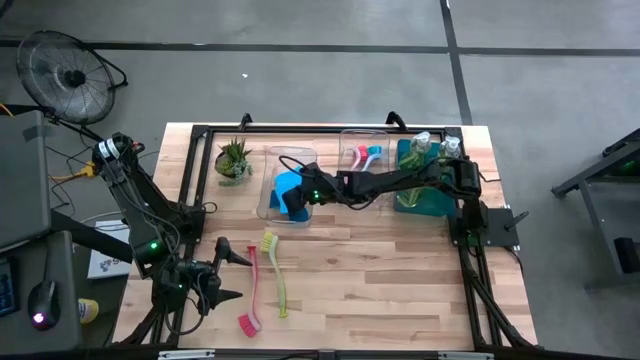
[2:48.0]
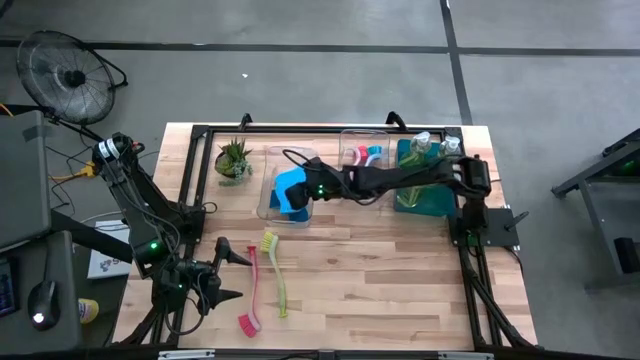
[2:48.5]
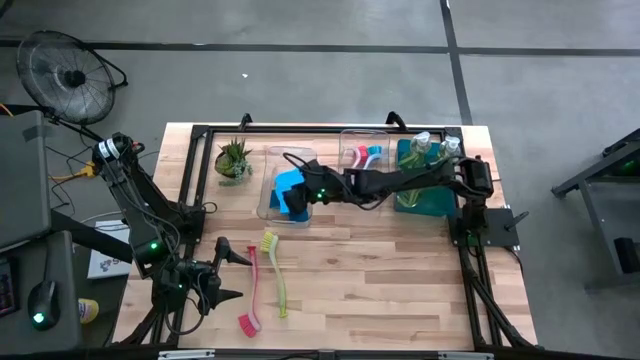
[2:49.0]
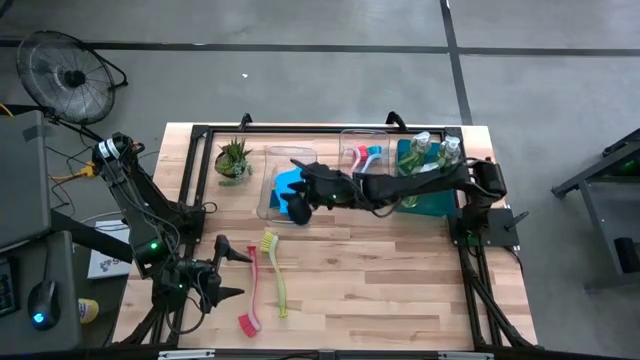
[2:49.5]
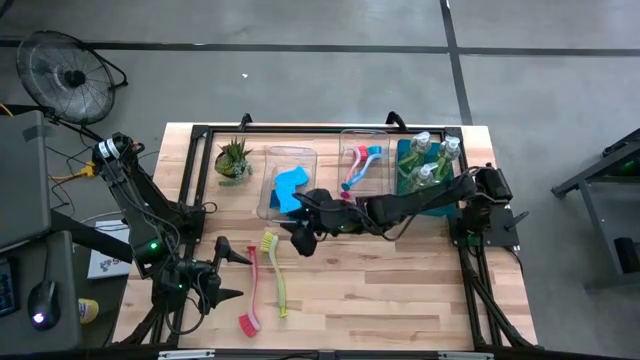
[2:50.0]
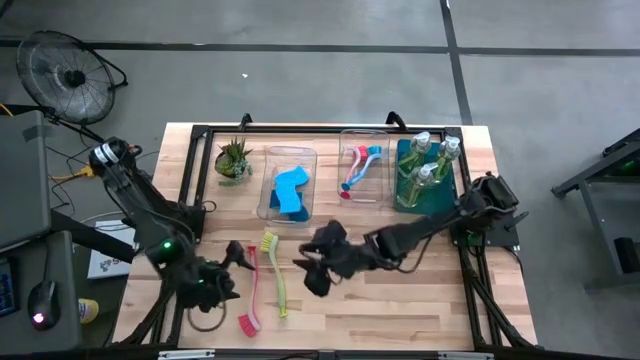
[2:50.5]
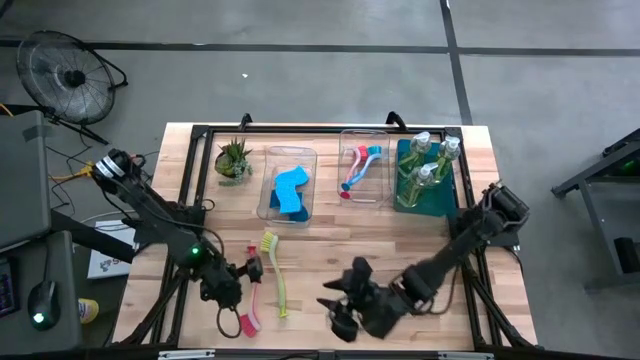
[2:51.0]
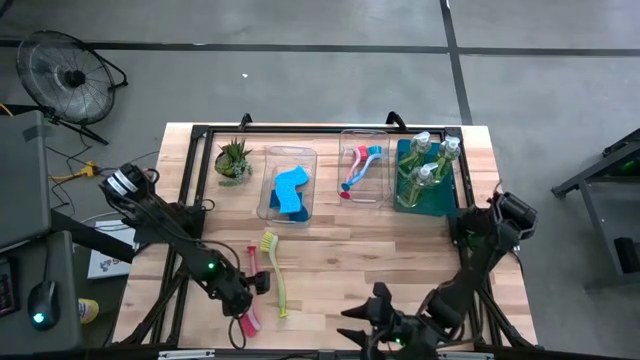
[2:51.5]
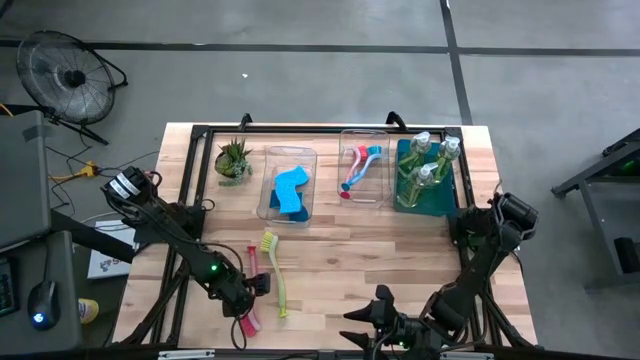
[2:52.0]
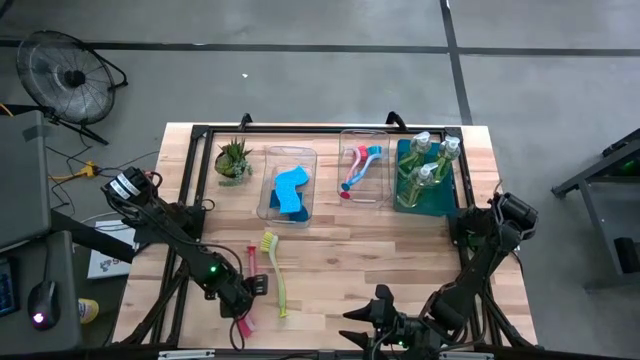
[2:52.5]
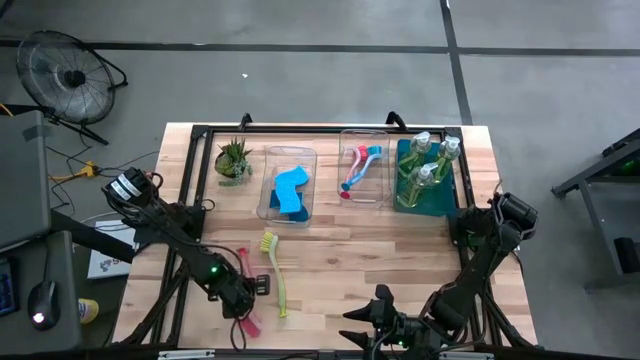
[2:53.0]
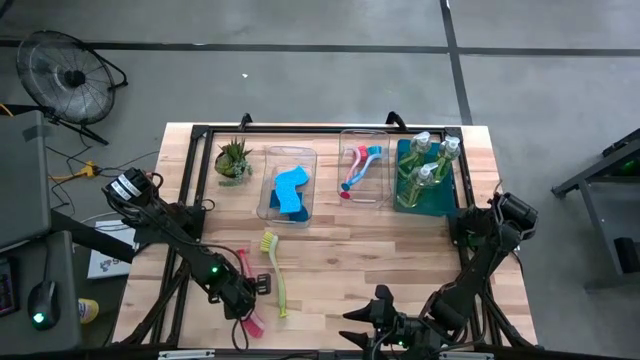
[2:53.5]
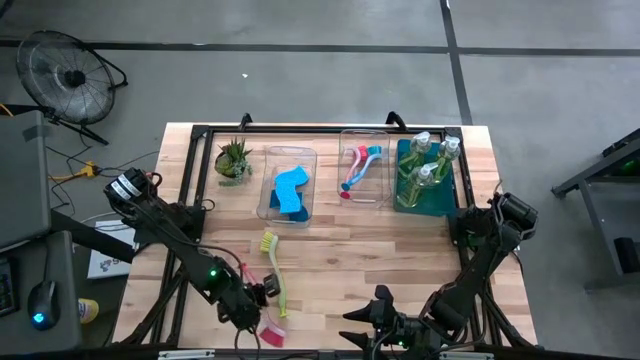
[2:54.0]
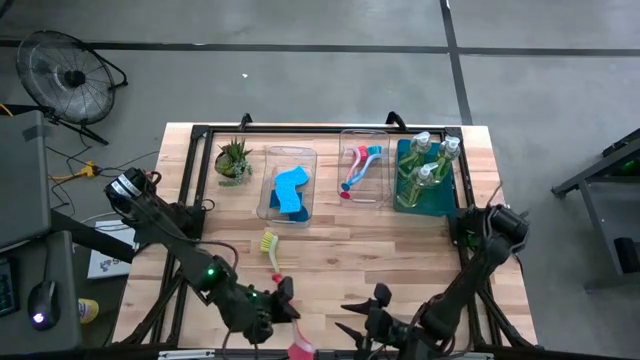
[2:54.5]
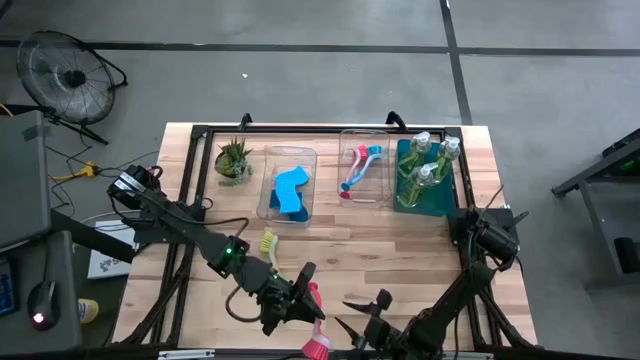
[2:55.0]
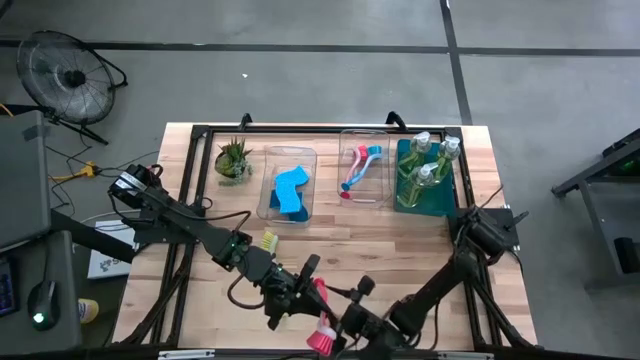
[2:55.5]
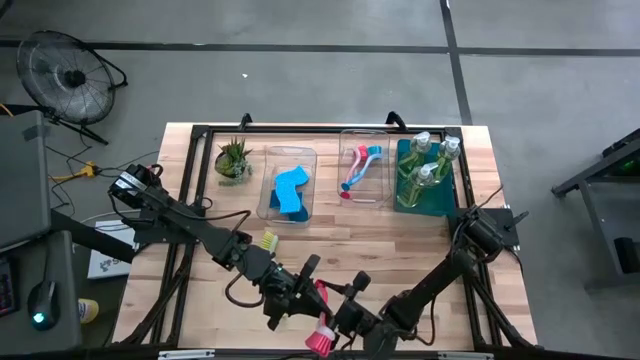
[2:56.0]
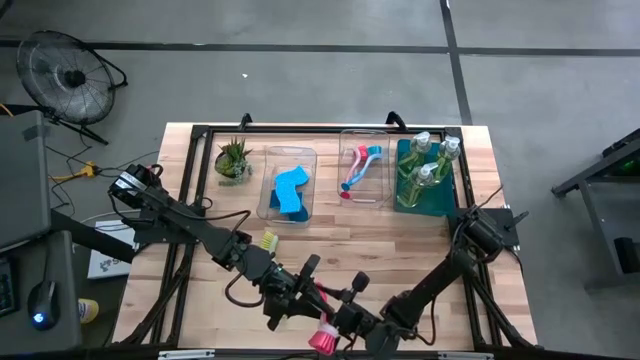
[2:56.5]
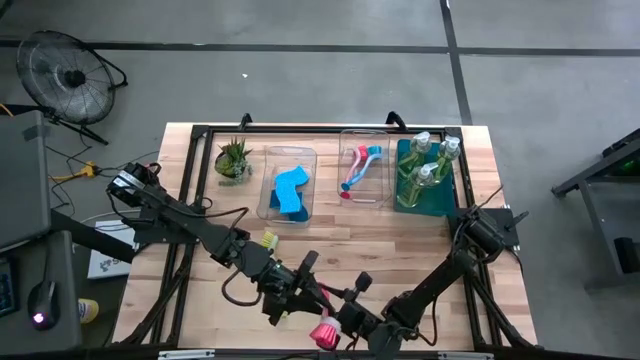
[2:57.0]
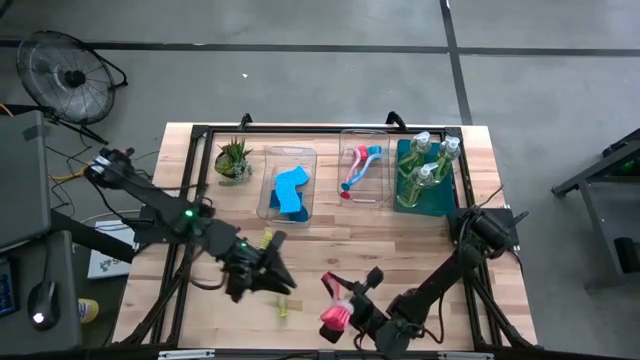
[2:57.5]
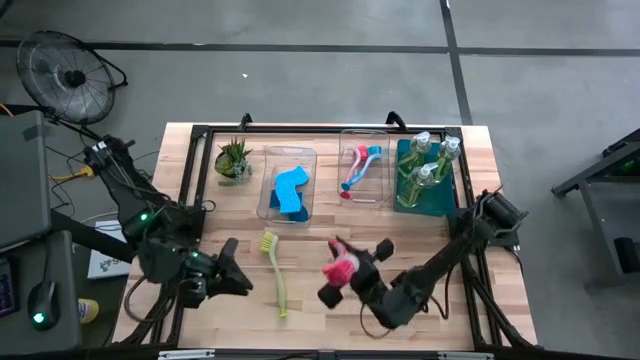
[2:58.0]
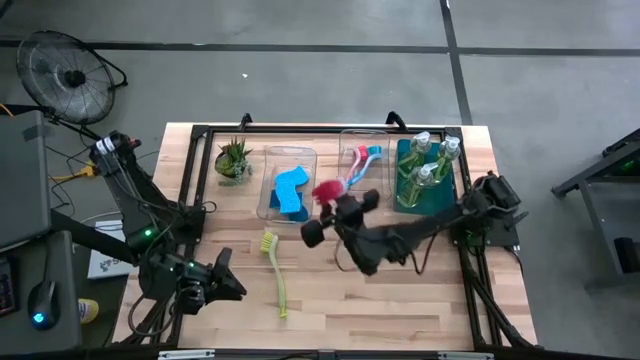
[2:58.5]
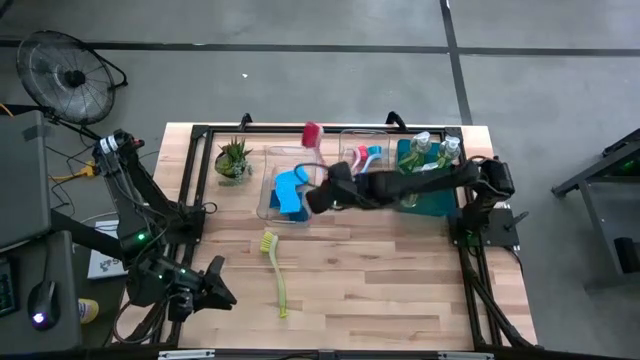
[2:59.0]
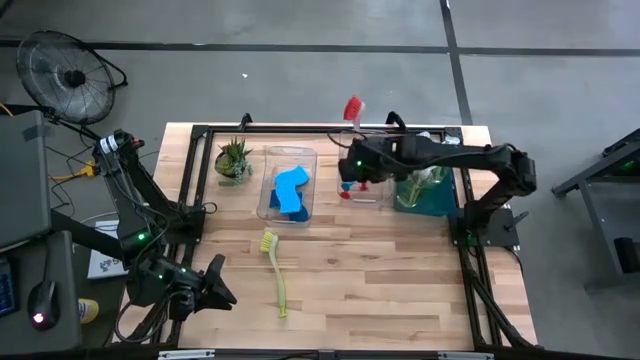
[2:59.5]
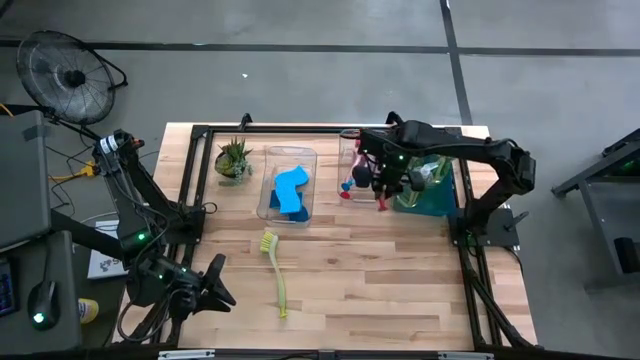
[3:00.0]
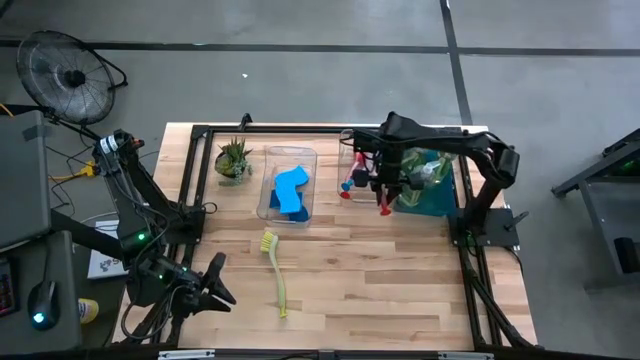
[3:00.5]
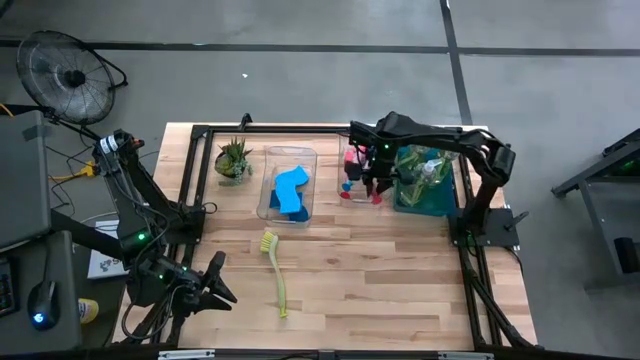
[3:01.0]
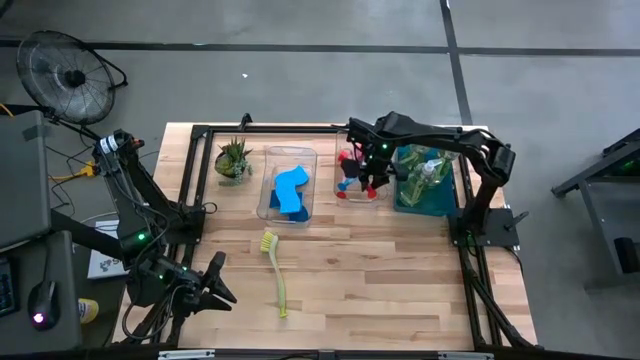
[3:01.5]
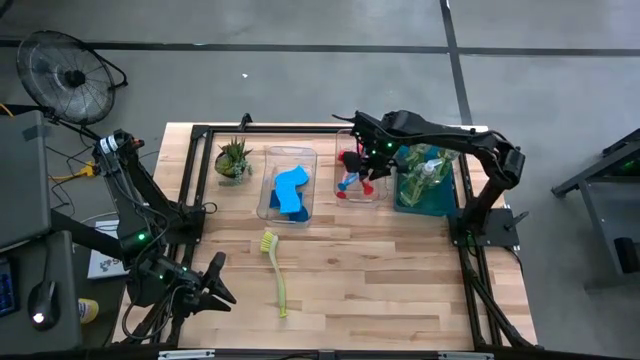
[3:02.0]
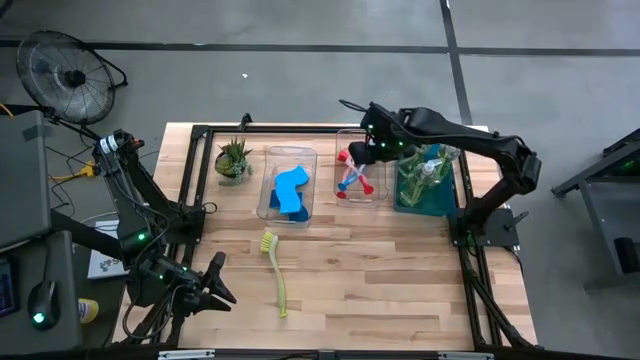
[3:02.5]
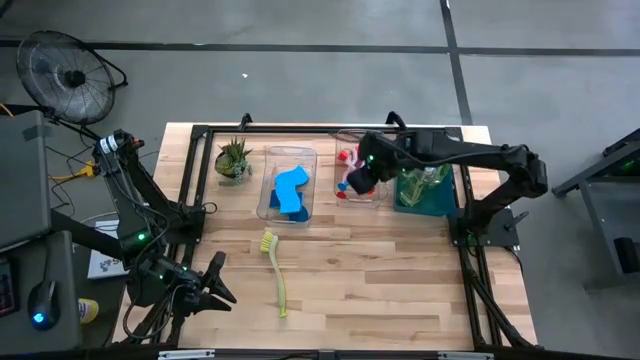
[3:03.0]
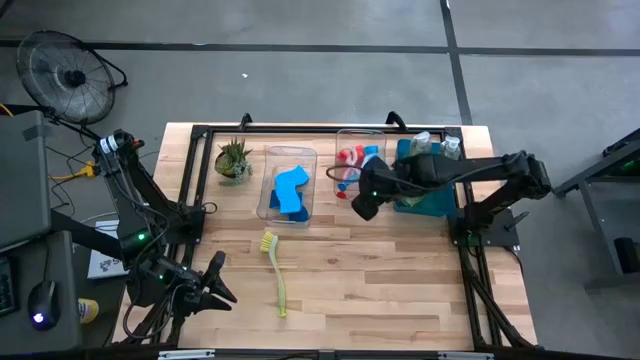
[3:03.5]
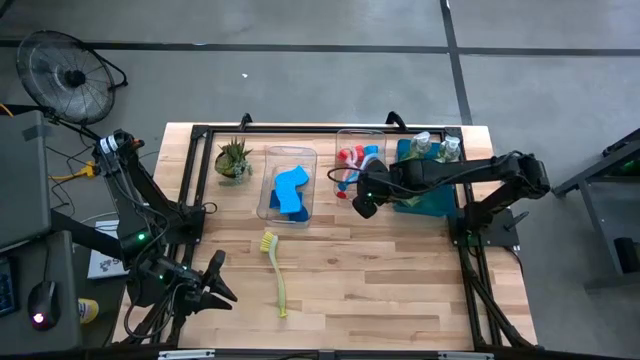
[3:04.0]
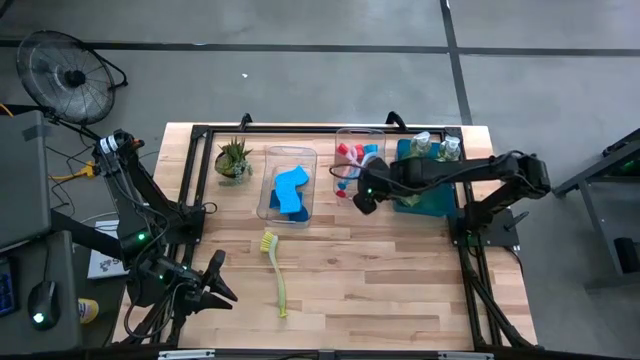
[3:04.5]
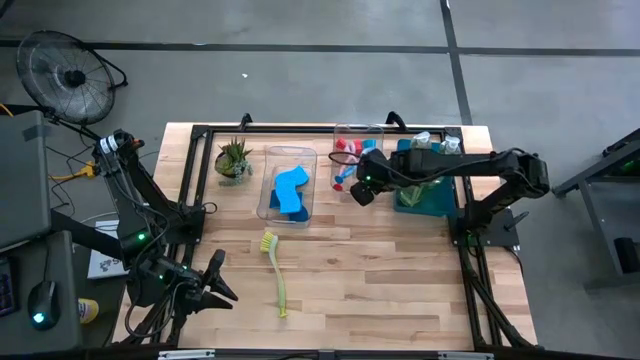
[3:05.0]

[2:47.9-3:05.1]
Task: Pick & Place Kitchen Sink Supplies
Put the red dishwashing brush into the right transparent bin

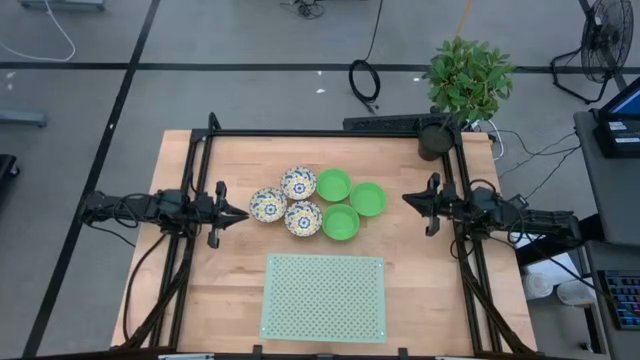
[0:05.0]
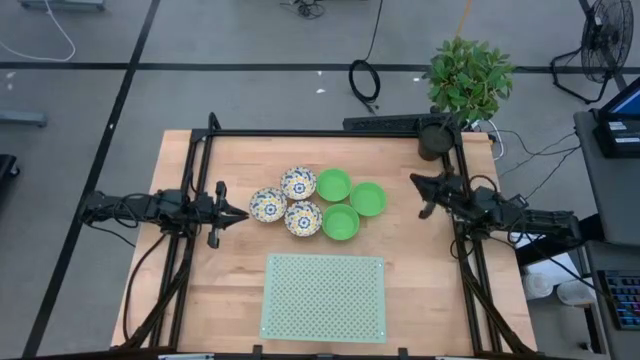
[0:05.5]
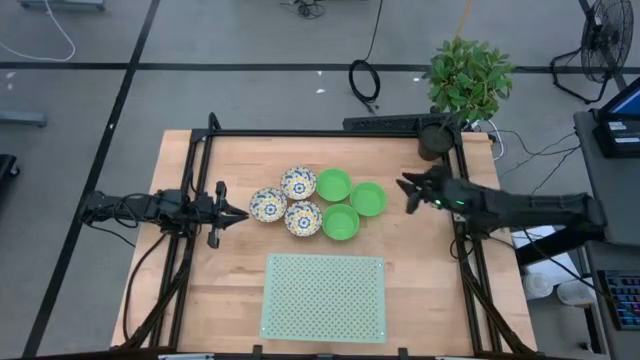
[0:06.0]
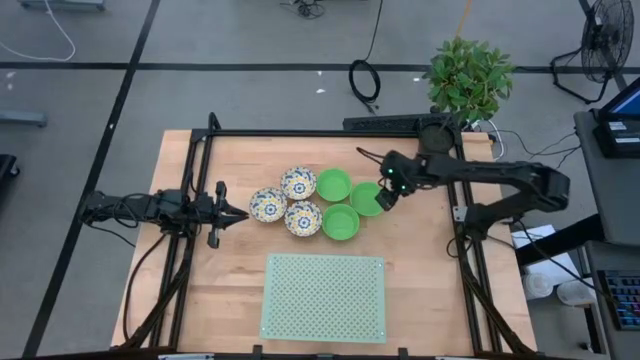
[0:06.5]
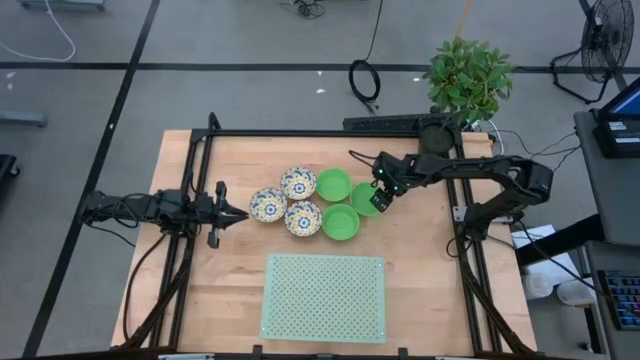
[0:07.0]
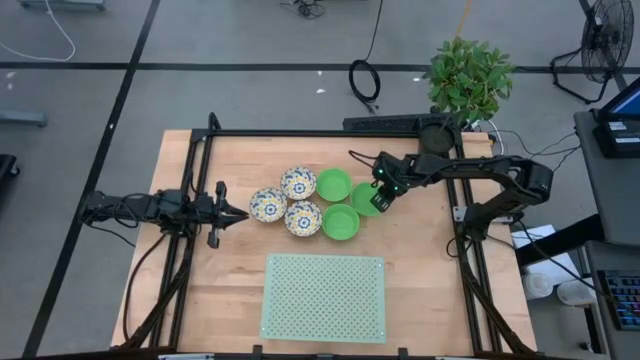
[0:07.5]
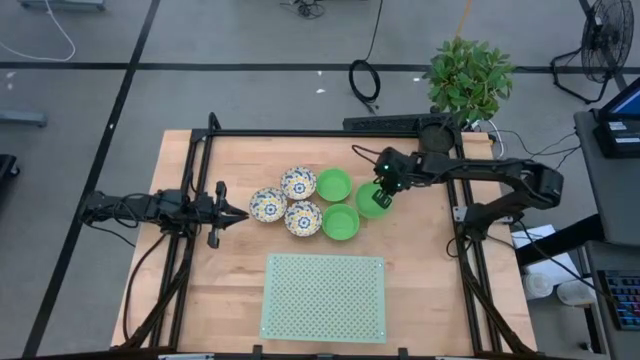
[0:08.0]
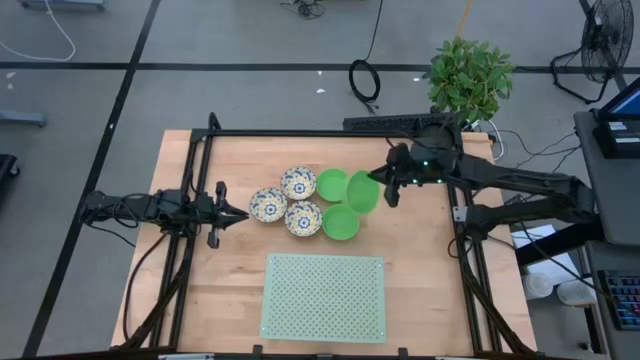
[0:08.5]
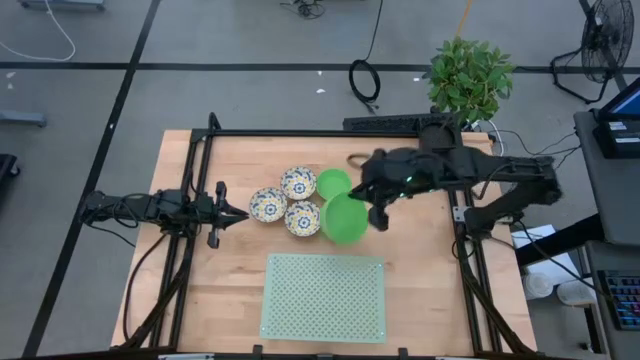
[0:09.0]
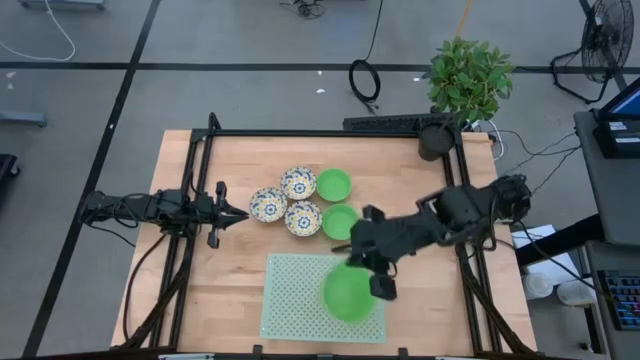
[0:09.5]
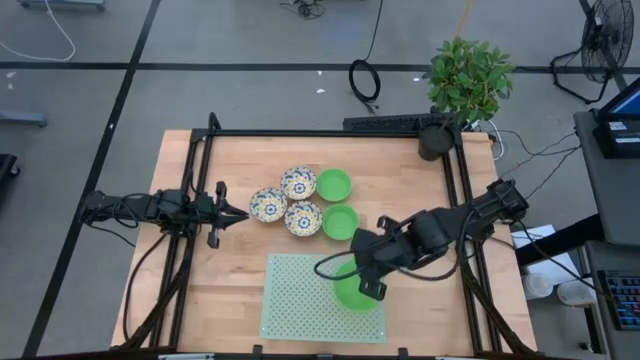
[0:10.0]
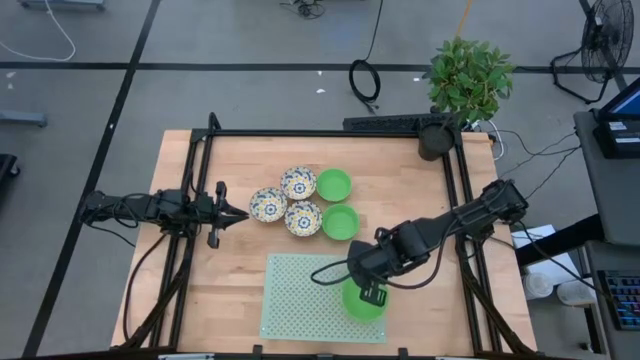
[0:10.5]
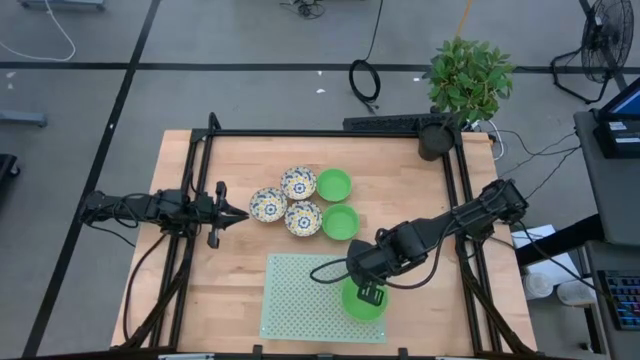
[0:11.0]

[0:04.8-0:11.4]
Task: Pick & Place Mini bowls
Put the middle right green bowl on the shelf
